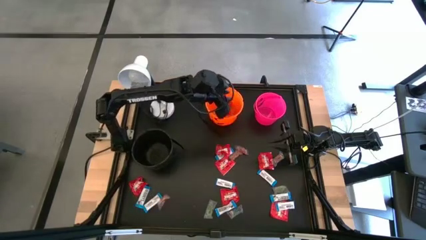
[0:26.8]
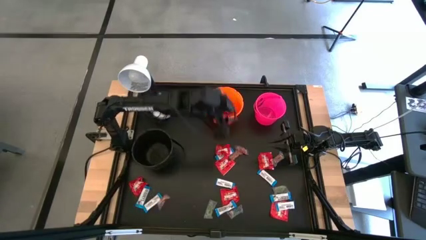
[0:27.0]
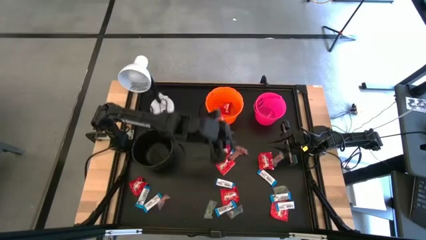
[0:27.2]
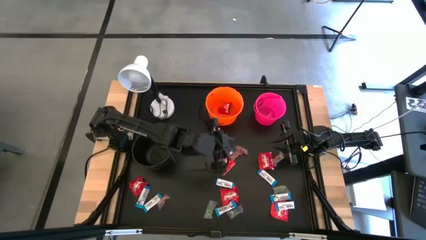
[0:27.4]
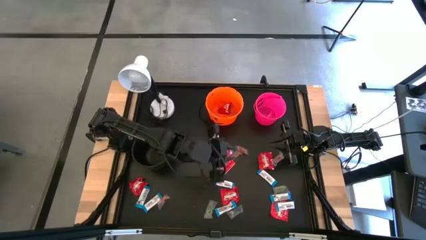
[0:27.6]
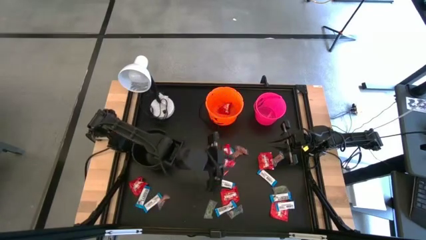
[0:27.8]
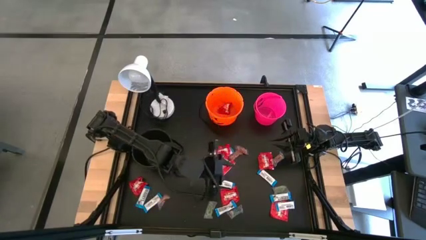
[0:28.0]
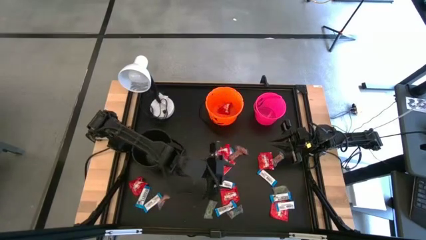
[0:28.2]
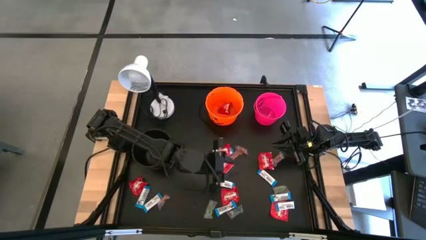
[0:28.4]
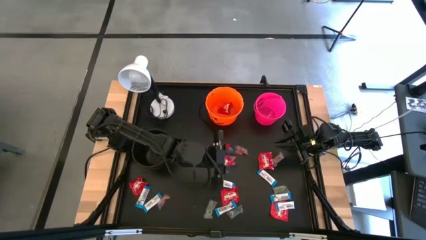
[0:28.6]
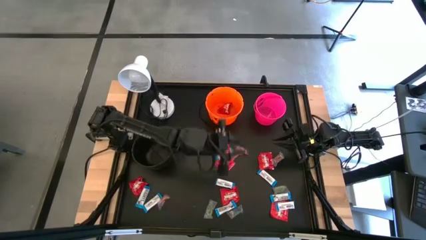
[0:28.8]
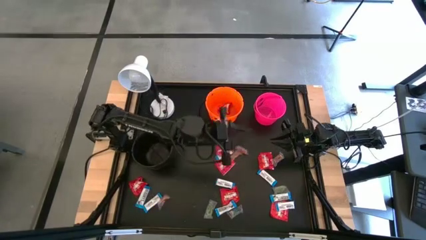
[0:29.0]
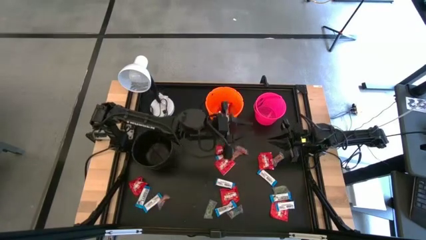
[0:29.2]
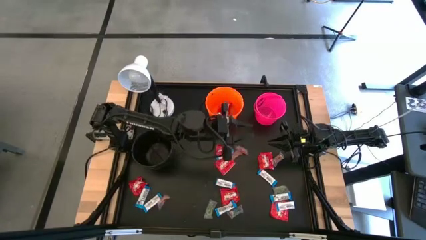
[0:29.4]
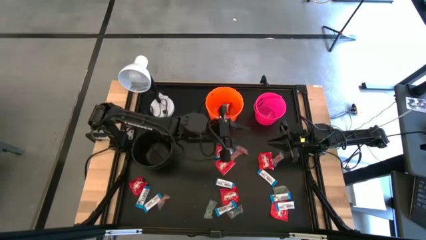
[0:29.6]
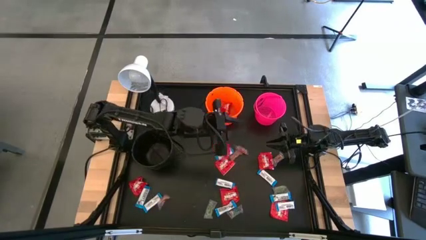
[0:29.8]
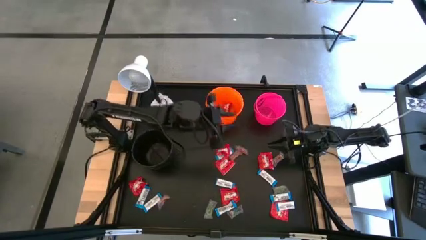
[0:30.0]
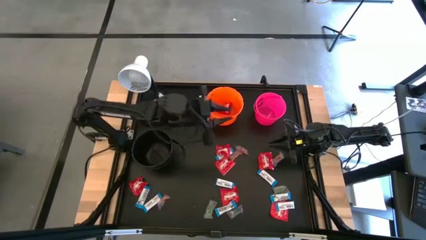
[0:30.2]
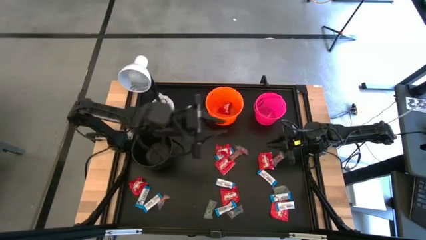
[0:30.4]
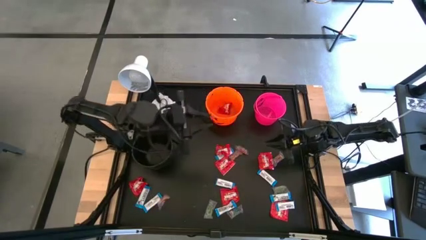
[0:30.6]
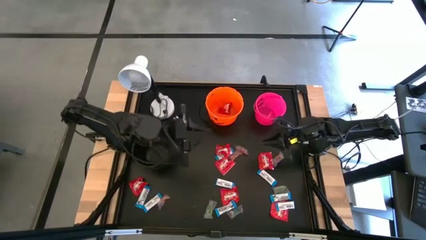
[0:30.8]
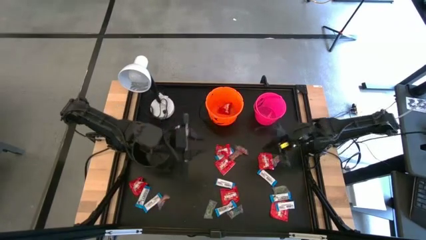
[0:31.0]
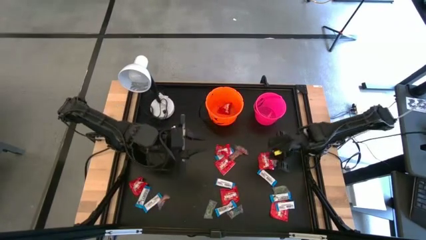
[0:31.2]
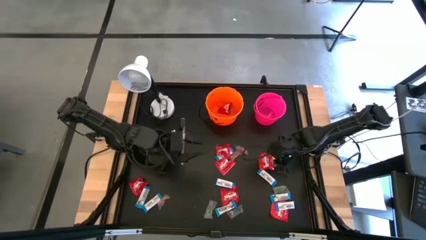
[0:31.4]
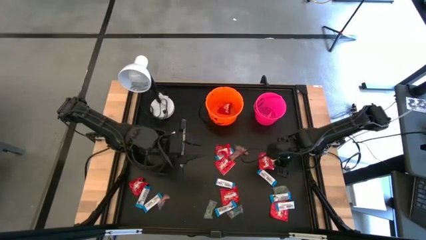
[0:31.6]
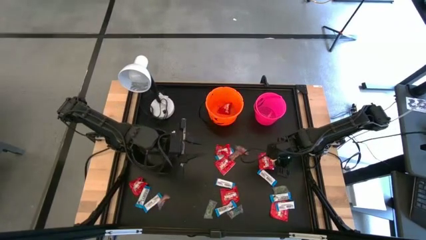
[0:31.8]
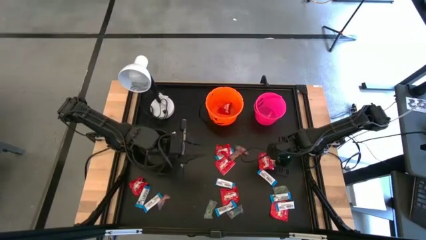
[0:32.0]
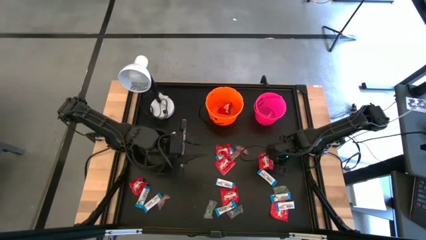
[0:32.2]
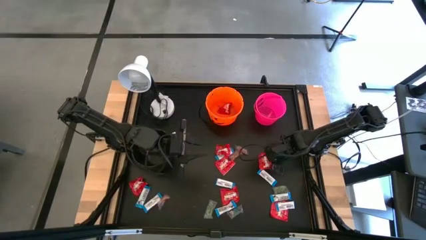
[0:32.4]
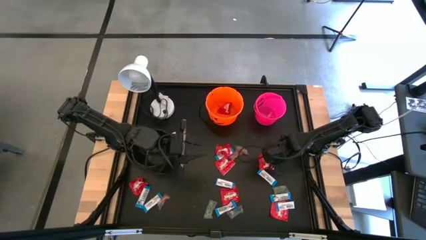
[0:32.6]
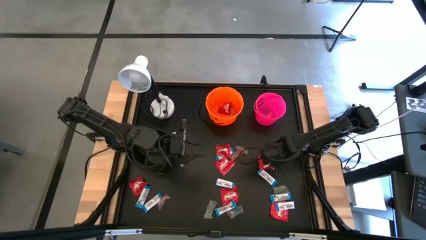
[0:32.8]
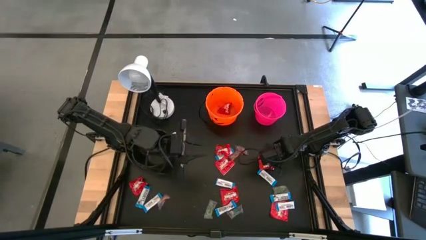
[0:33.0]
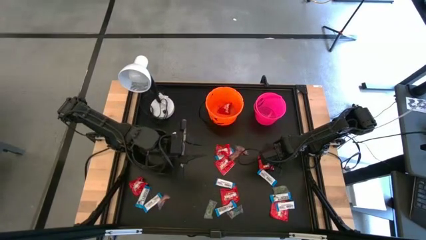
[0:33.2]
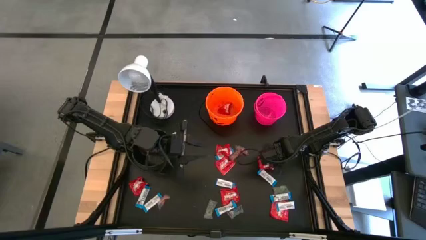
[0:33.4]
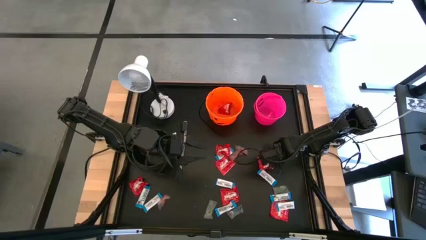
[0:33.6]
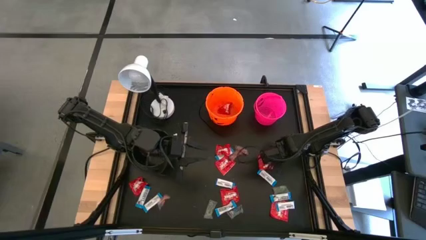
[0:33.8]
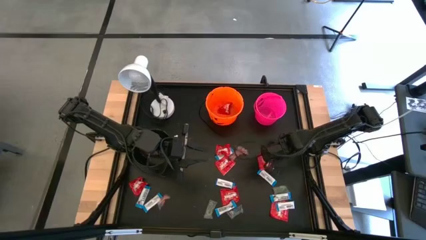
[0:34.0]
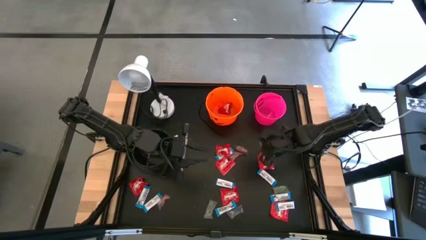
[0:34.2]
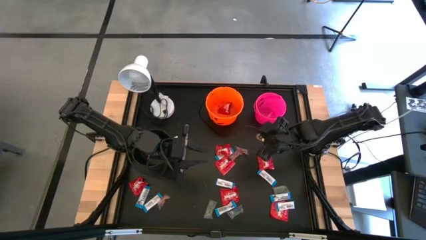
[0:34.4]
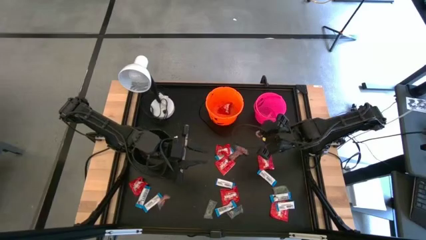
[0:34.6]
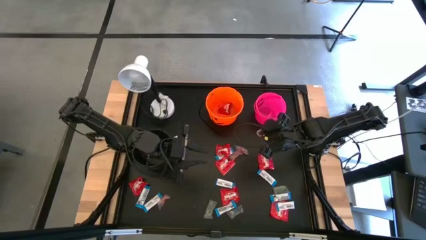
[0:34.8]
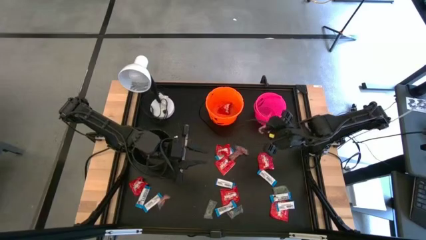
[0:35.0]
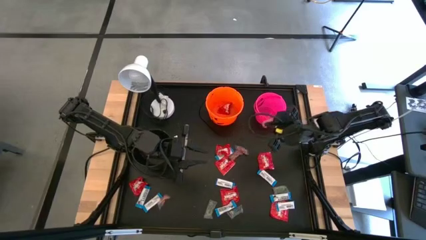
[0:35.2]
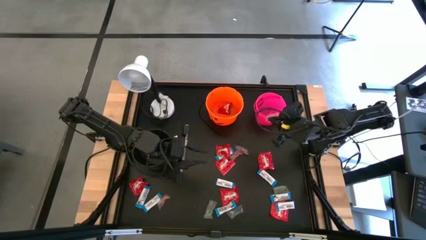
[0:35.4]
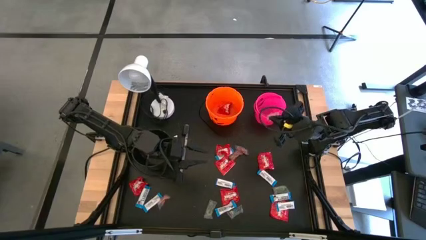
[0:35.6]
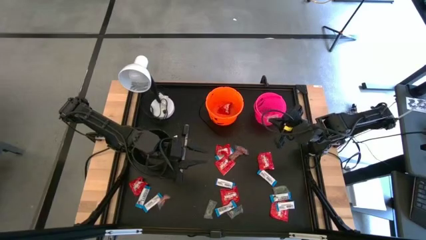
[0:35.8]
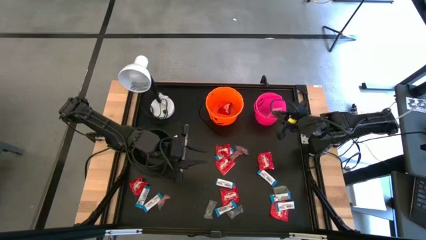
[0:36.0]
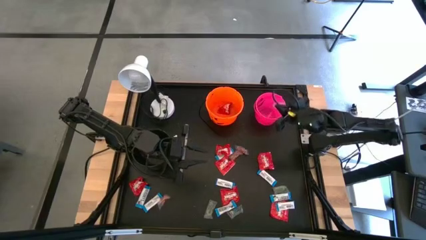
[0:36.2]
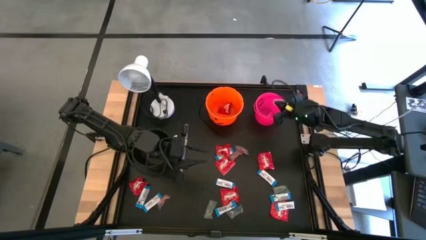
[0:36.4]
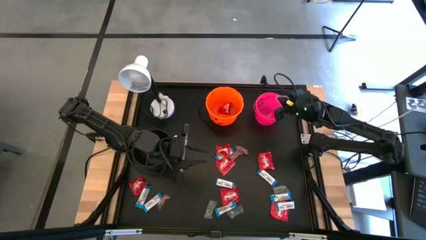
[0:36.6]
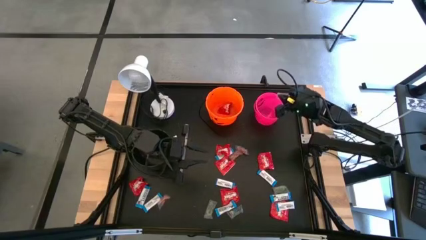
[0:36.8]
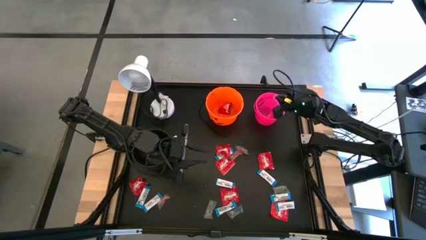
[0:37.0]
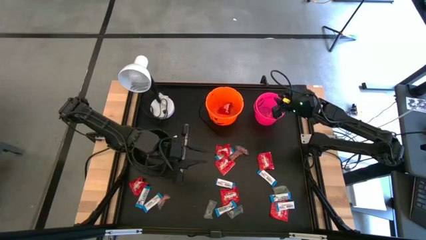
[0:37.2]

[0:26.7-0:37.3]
Task: Sort candy
Put the orange candy into the pink bucket

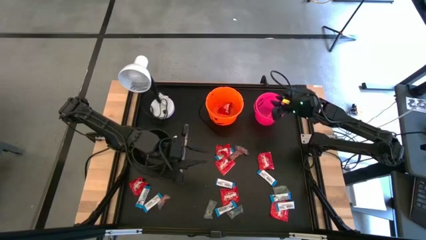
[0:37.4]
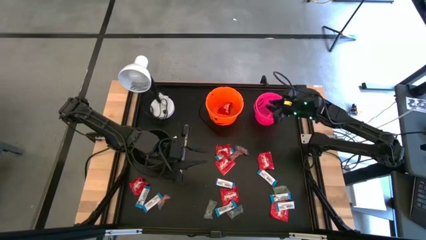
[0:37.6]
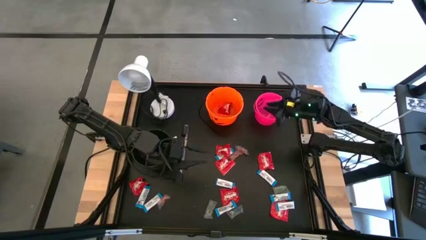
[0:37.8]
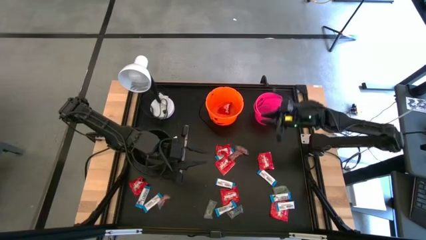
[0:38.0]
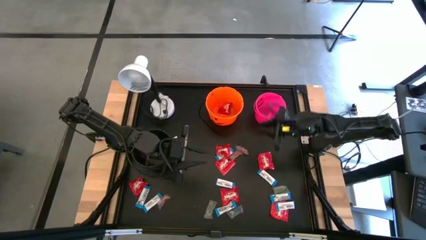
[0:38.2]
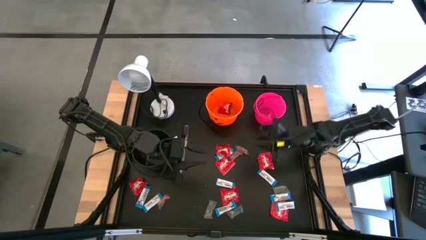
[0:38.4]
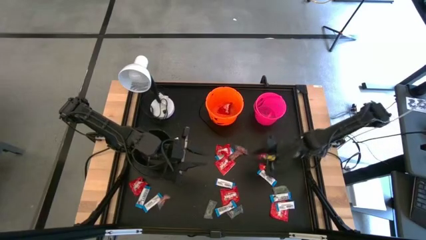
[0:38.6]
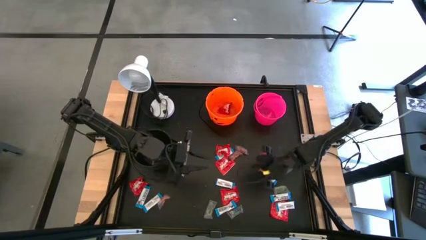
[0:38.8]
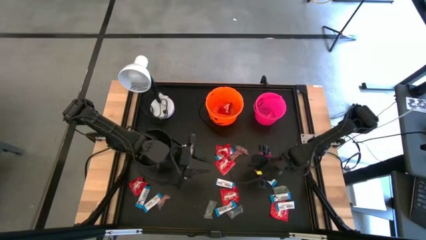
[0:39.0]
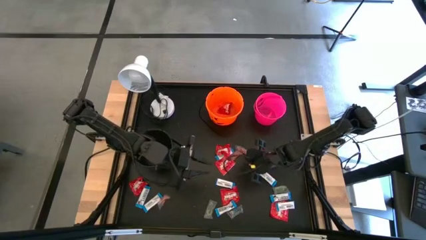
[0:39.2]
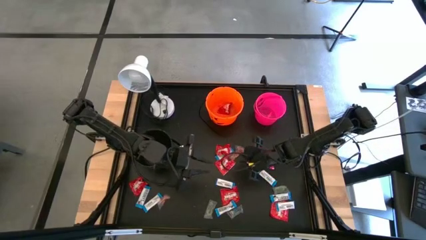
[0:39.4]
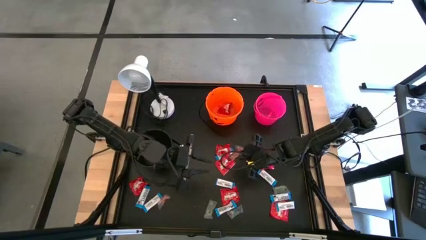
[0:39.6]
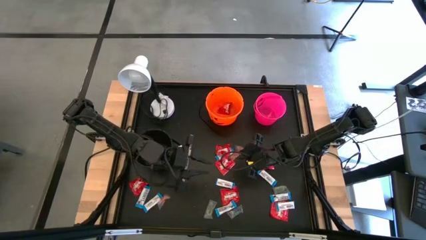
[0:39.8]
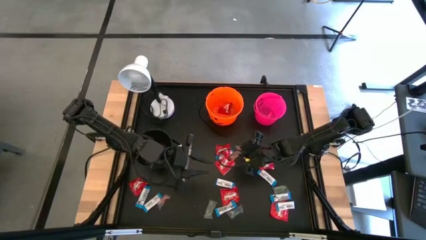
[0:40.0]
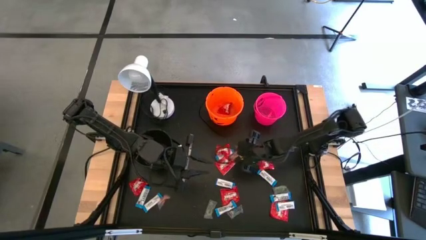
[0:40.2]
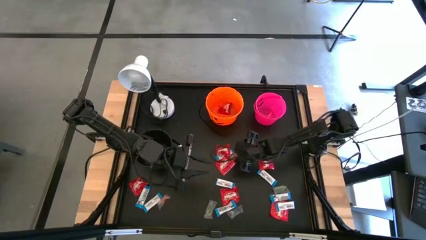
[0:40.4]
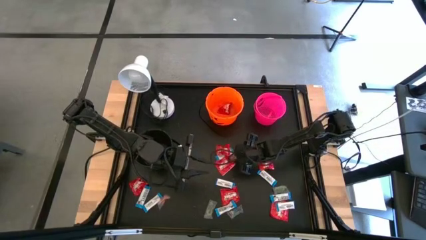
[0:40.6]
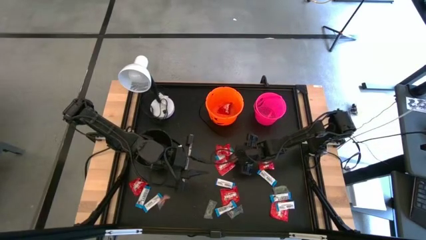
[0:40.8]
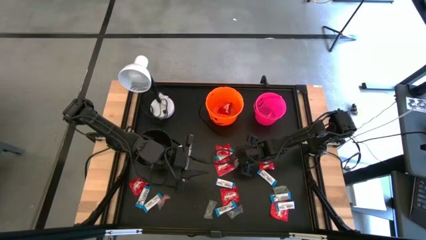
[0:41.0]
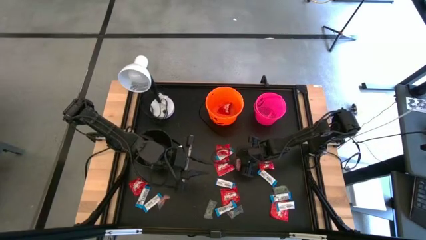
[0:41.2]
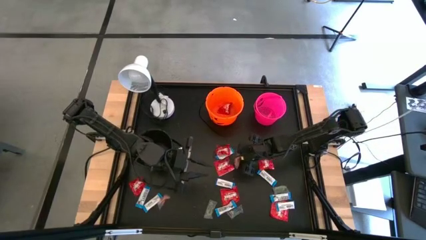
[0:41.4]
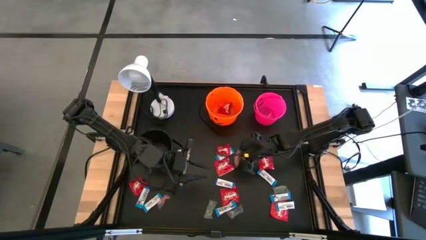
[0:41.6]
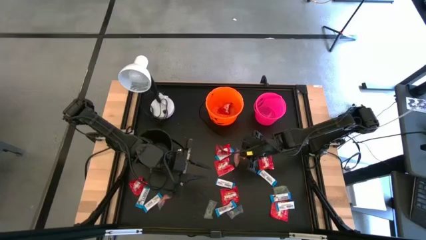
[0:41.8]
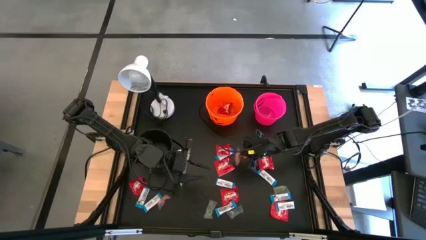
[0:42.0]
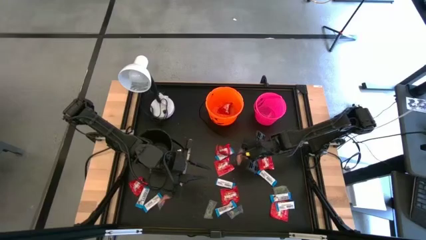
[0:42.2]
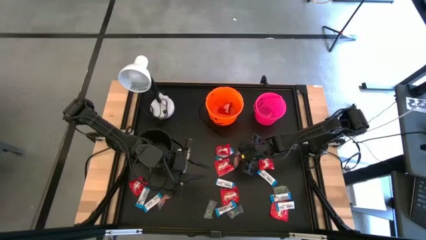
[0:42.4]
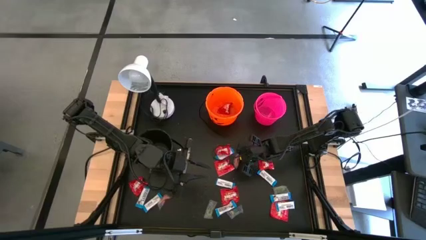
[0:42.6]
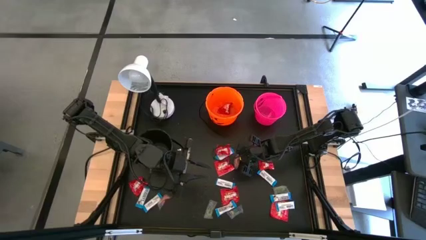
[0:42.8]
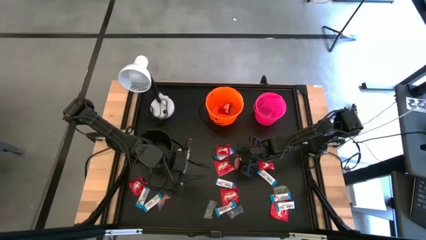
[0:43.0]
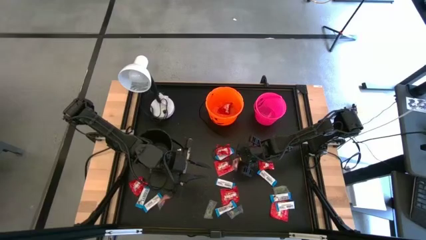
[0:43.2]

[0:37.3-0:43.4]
Put the orange candy into the pink bucket

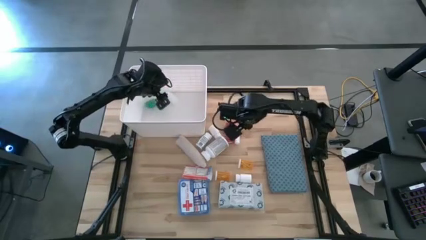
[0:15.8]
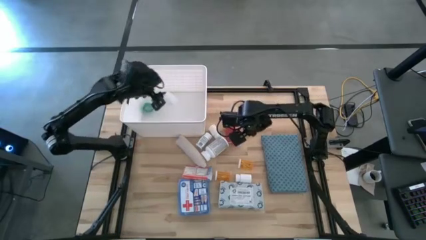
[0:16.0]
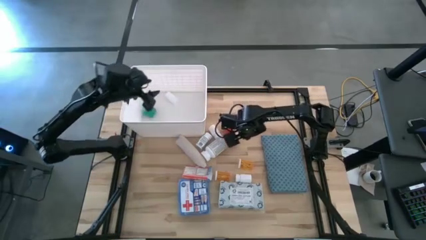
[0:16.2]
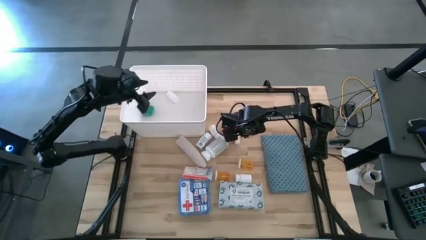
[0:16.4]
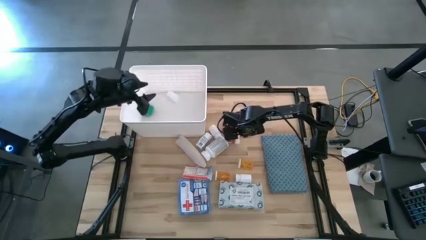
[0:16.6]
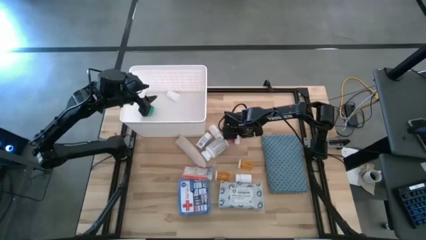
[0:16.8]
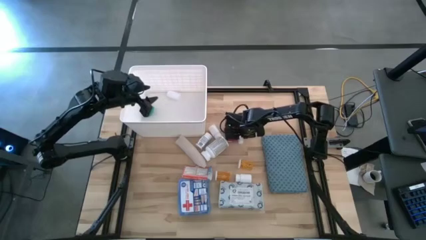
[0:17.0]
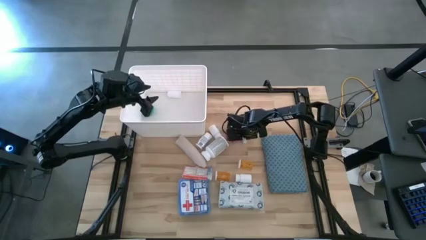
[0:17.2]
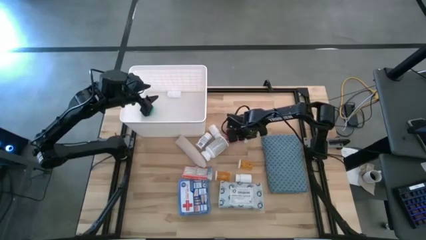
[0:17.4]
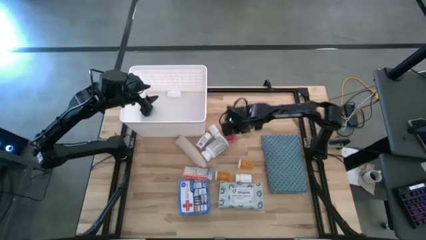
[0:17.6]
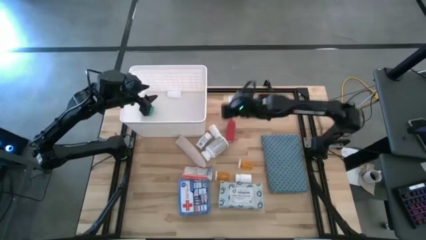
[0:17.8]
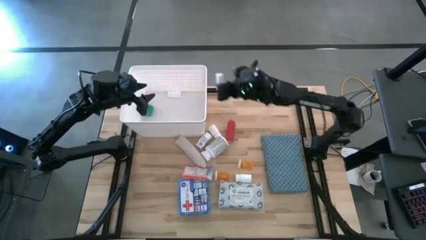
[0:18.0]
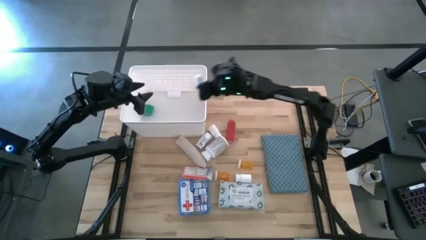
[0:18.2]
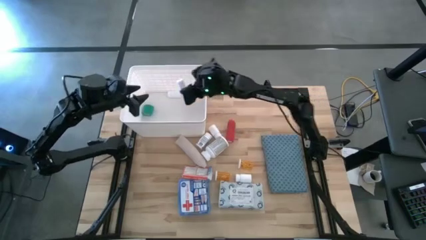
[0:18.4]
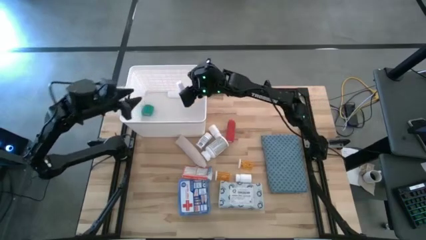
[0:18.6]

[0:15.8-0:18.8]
Task: Pick & place medical supplies in basket/bin
Put the white rolled gauze into the white bin
